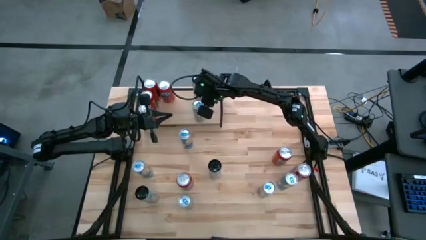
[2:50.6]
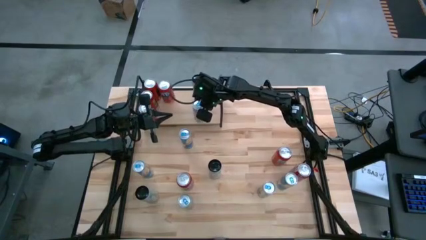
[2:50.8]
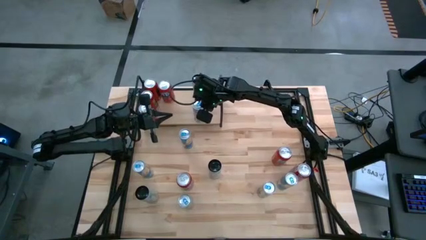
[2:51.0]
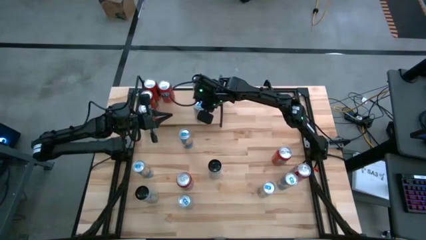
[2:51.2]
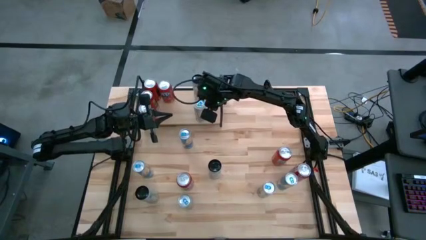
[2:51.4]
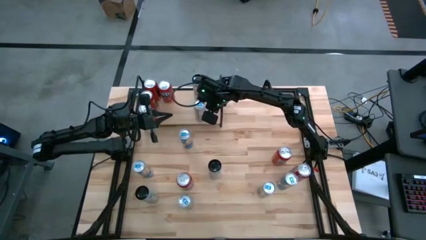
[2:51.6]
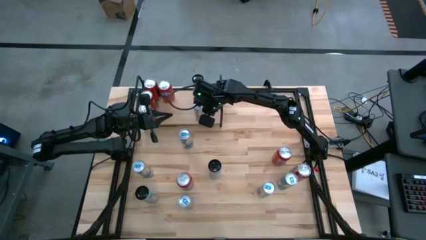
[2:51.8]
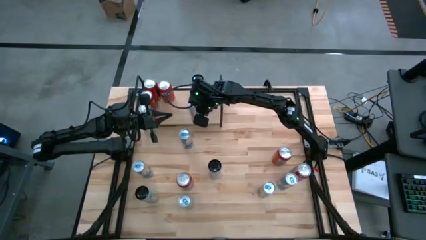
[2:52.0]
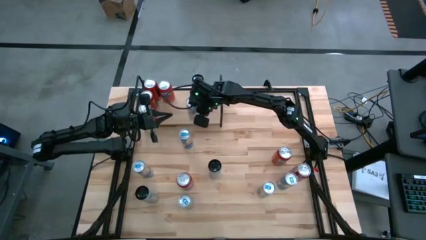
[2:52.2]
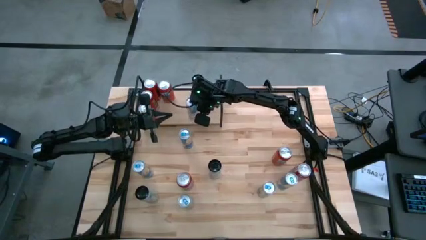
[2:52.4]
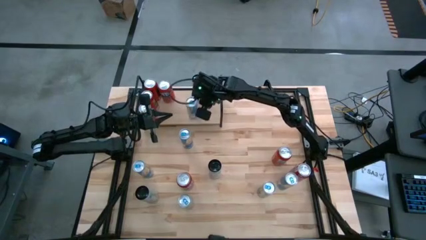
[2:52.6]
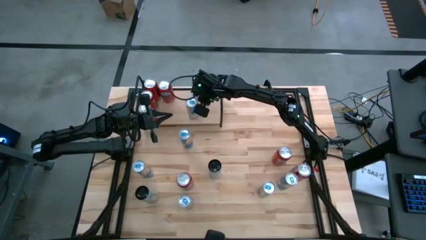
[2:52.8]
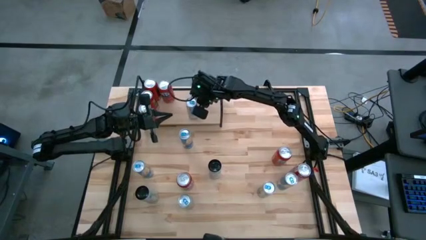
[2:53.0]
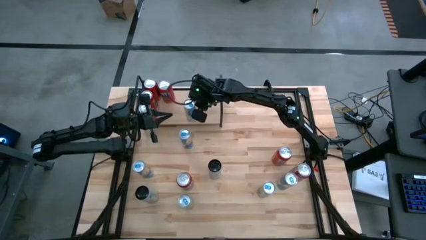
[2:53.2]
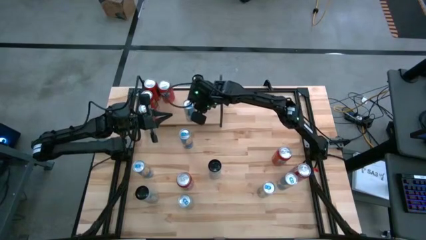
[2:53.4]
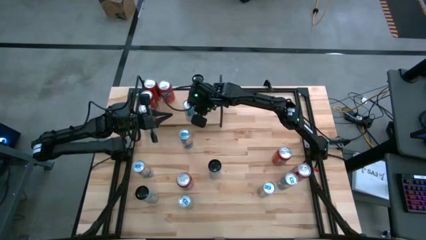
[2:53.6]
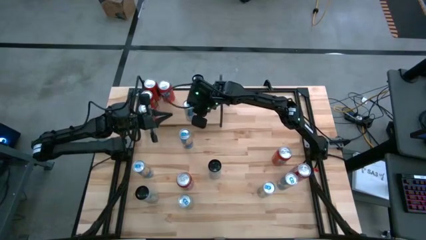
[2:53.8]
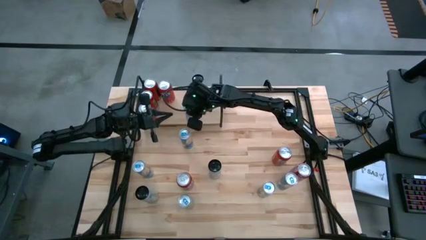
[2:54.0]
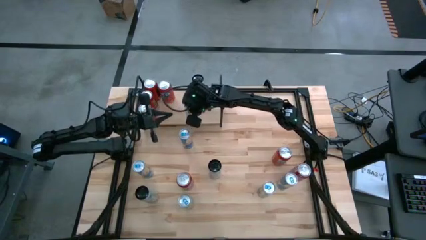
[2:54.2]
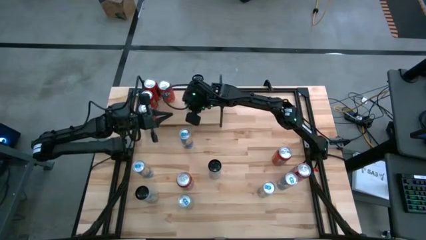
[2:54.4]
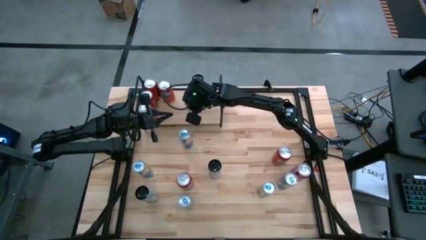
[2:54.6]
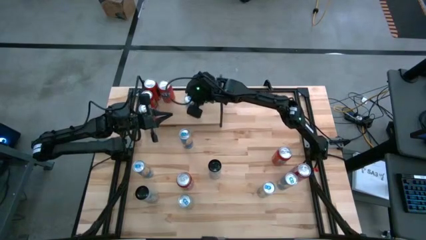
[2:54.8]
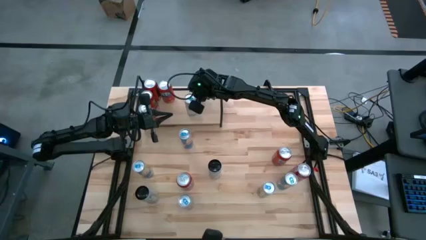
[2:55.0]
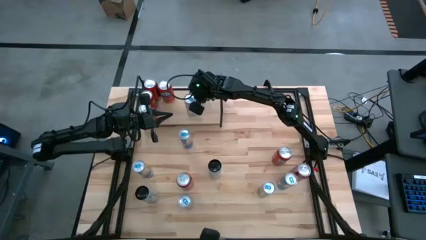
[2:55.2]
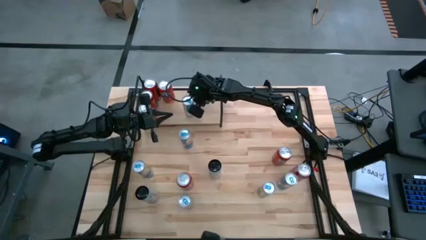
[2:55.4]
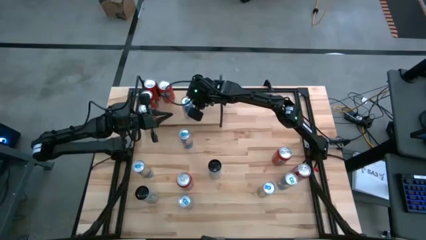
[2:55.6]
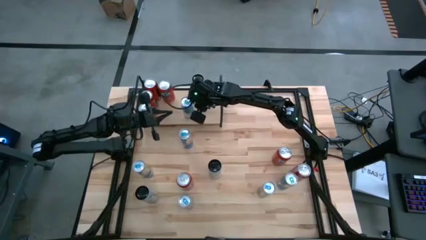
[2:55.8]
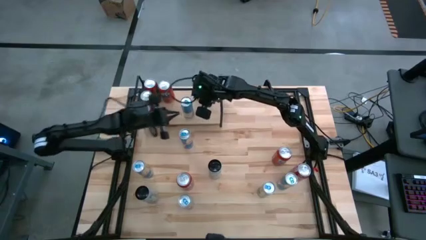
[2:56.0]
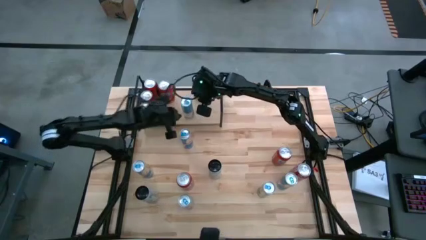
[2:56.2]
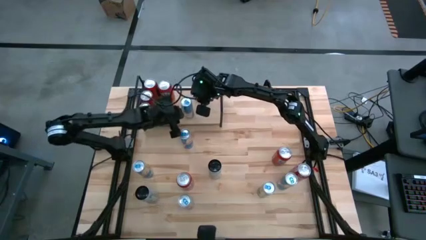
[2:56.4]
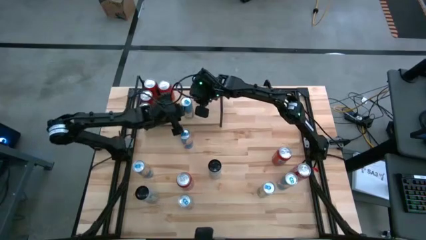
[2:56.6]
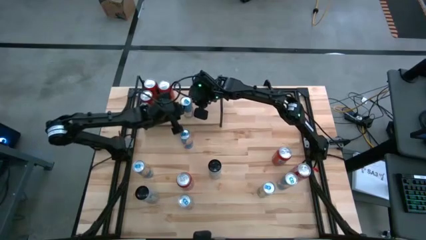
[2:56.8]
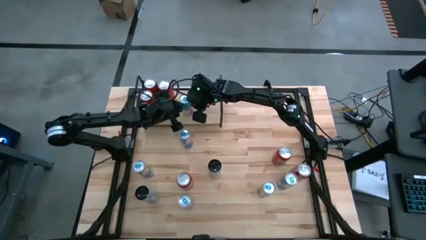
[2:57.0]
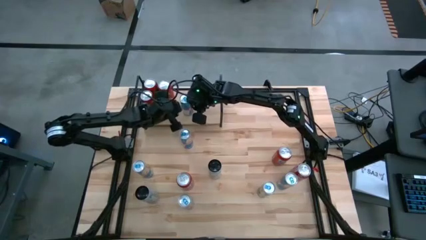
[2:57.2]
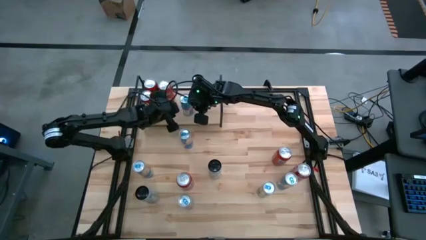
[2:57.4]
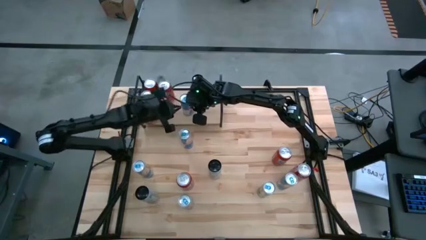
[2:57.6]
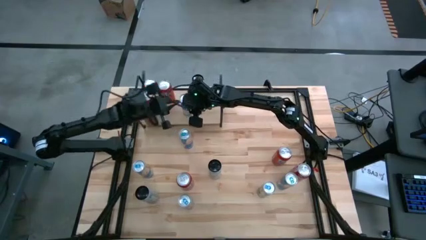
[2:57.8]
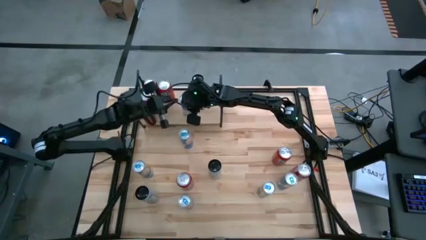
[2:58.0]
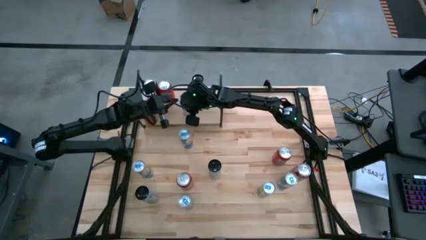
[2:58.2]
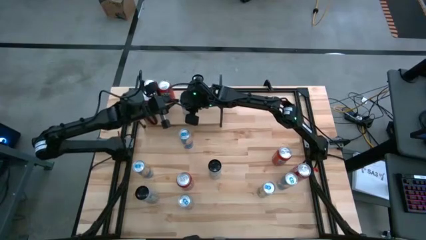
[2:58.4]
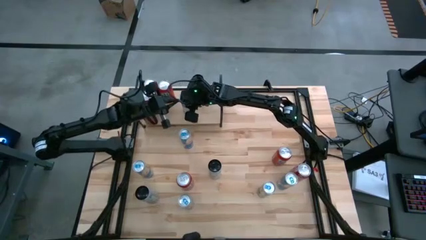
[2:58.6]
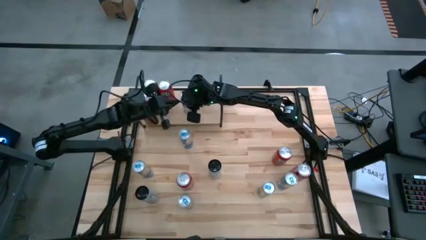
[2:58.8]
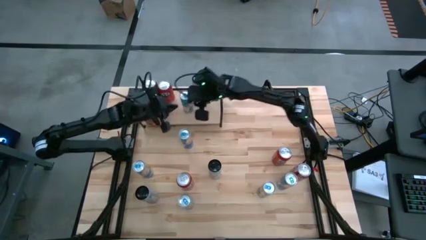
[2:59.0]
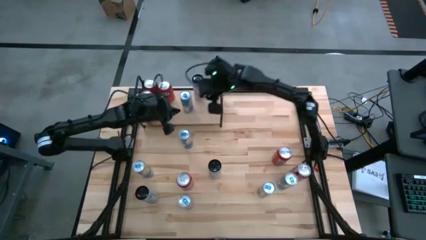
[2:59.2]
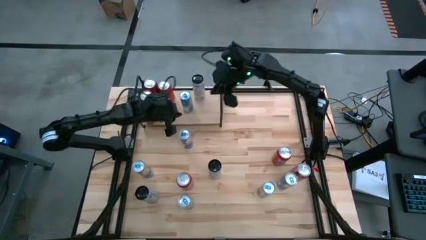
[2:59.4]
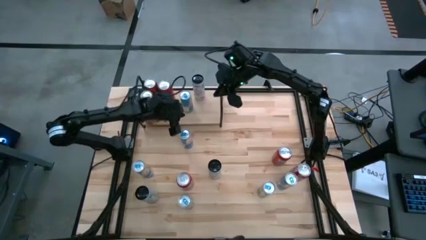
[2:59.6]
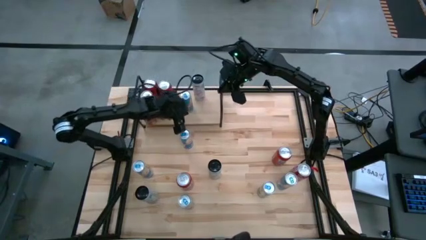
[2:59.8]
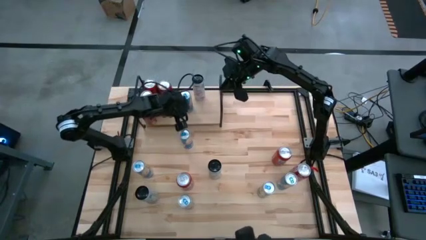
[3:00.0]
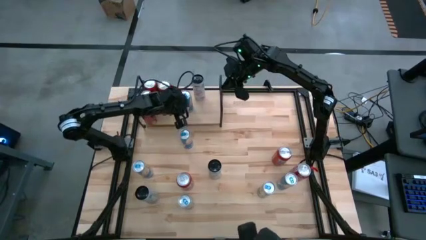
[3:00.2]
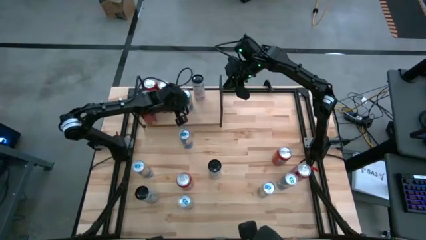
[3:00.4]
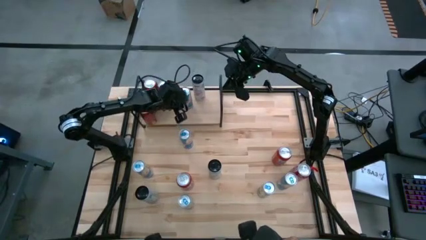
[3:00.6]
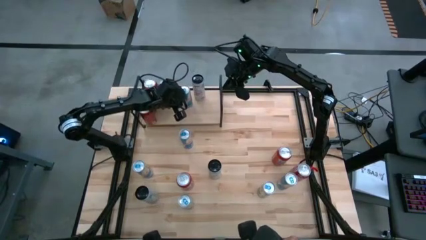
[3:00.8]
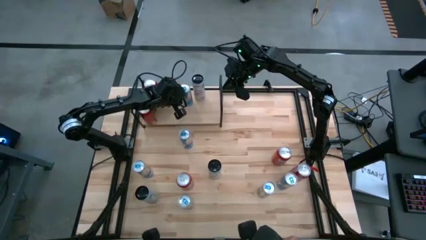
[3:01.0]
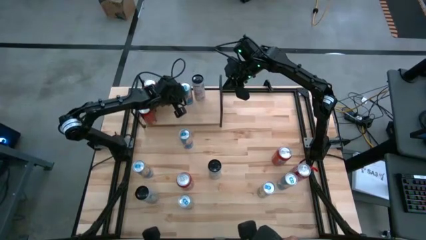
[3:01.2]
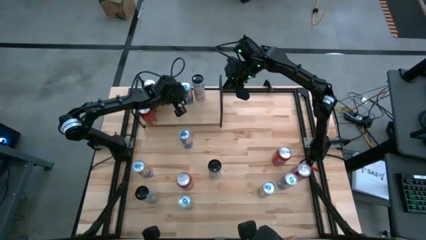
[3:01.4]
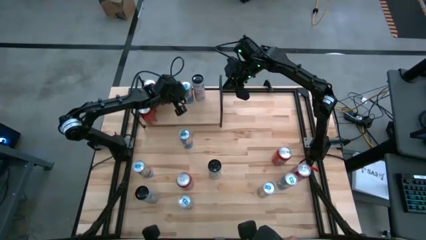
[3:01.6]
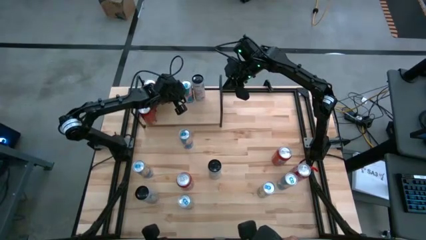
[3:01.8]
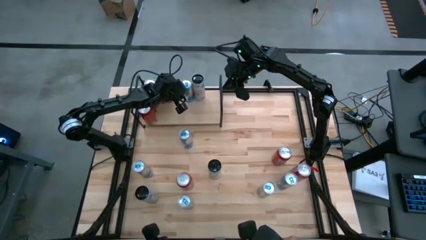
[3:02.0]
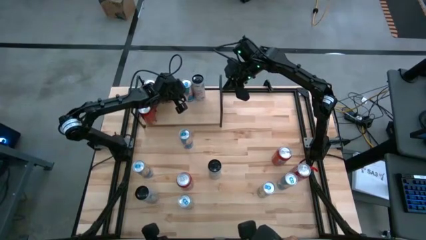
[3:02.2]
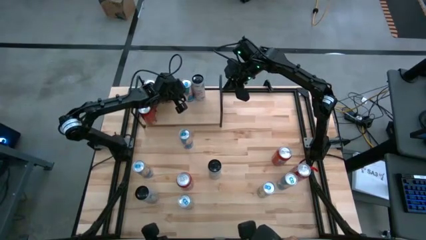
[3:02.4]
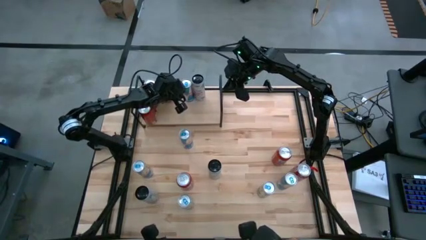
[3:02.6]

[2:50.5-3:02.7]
Task: Place canned beverage on shelf
Put the blue soda can on the shelf
